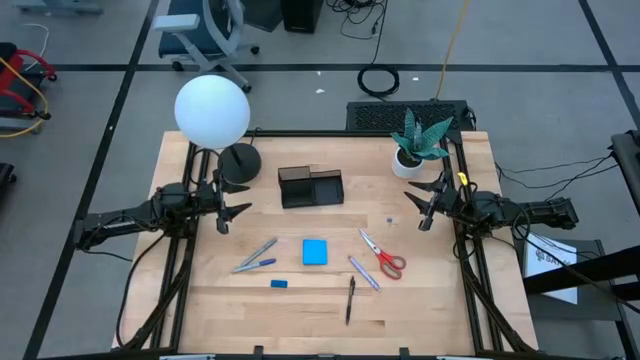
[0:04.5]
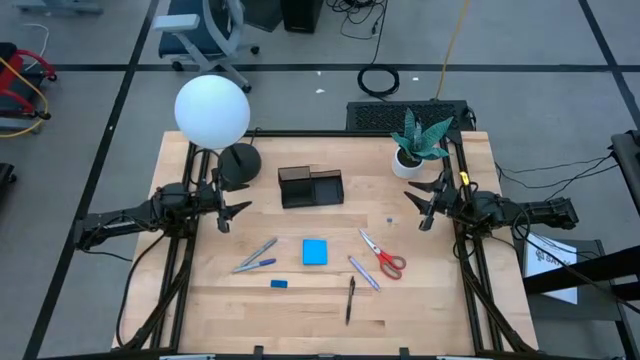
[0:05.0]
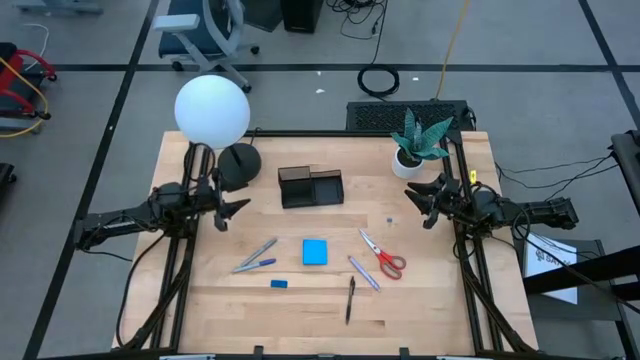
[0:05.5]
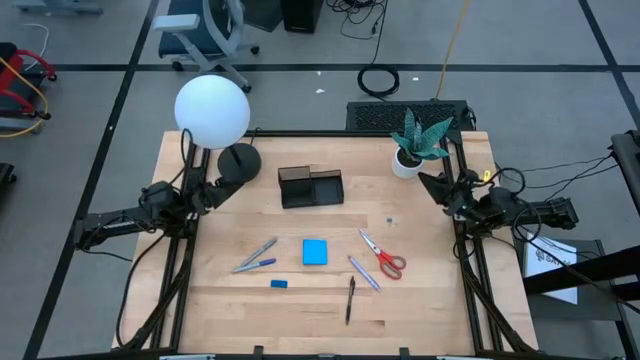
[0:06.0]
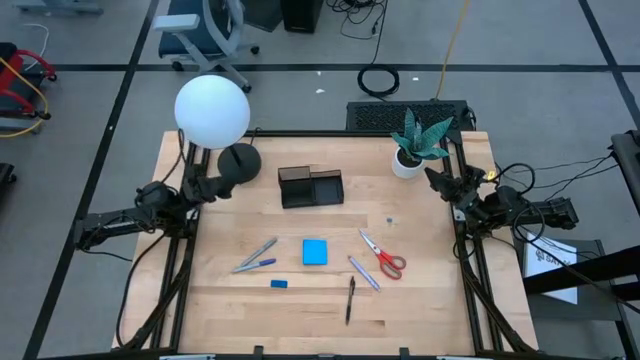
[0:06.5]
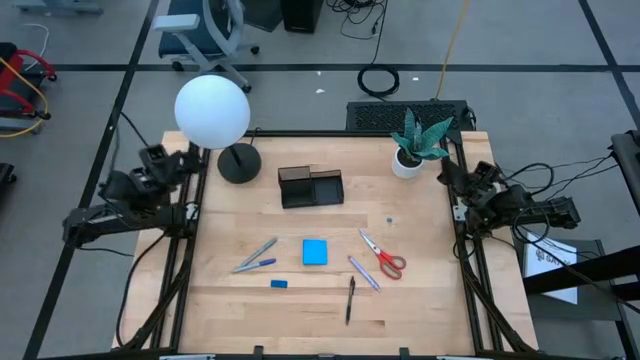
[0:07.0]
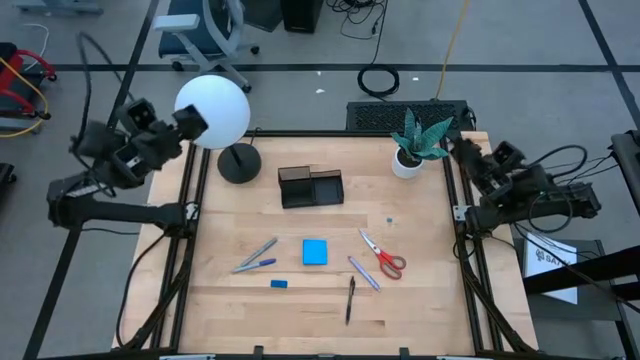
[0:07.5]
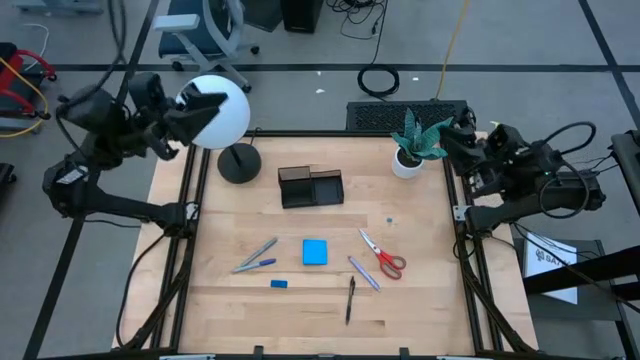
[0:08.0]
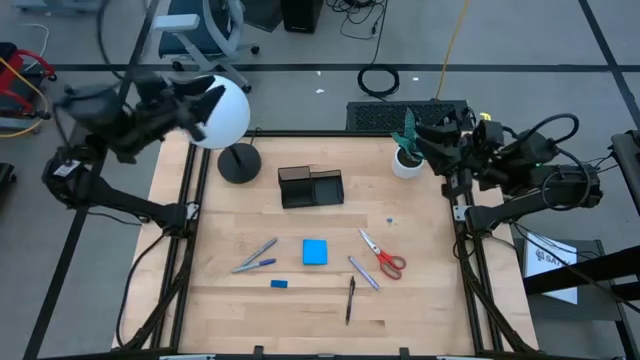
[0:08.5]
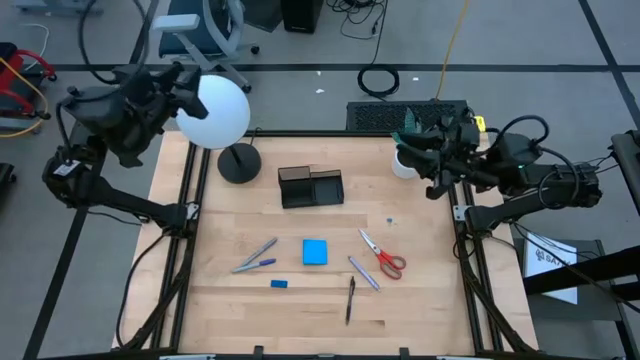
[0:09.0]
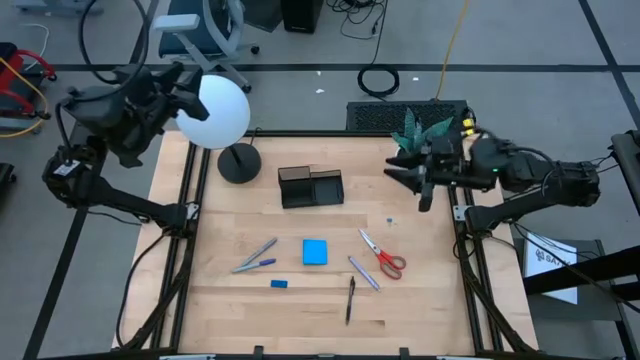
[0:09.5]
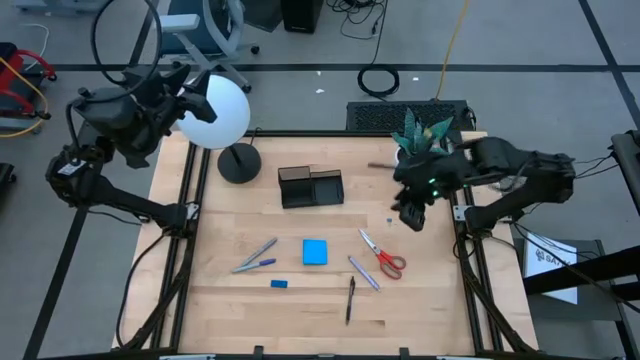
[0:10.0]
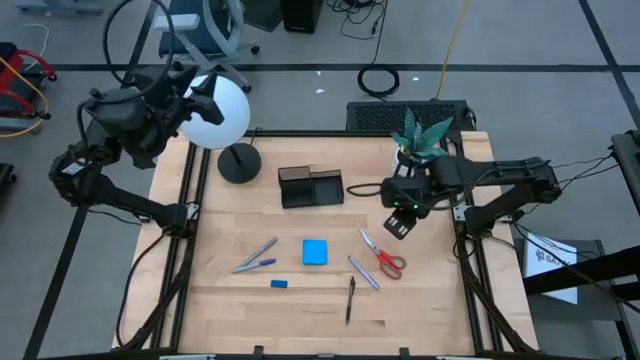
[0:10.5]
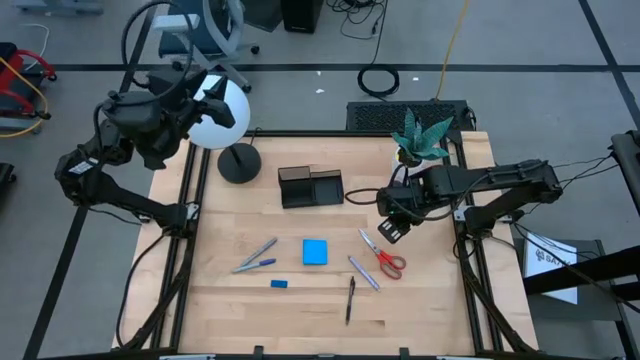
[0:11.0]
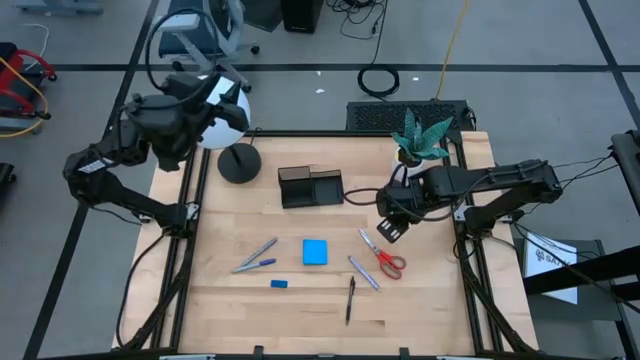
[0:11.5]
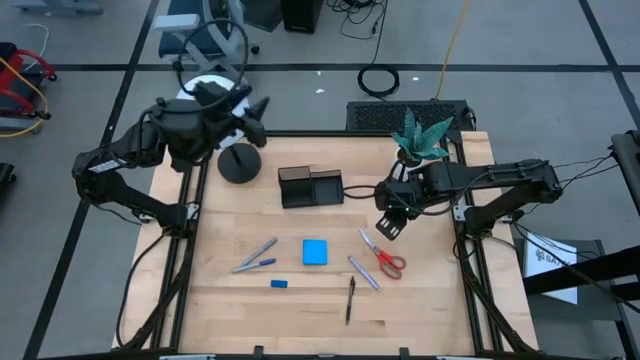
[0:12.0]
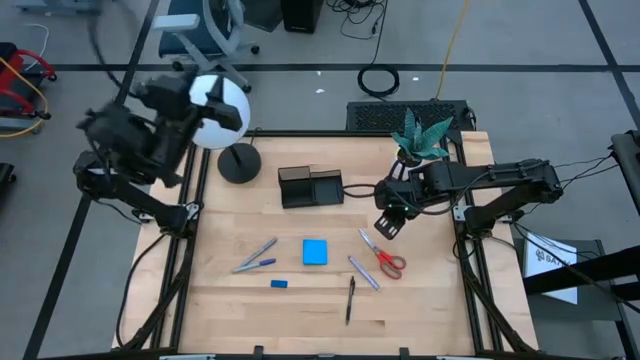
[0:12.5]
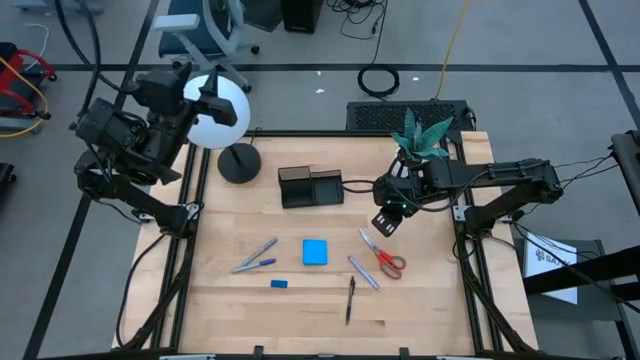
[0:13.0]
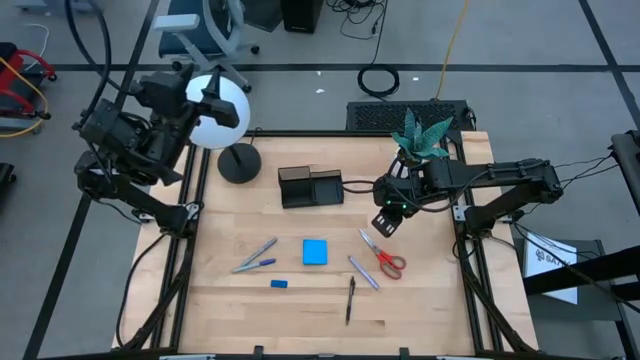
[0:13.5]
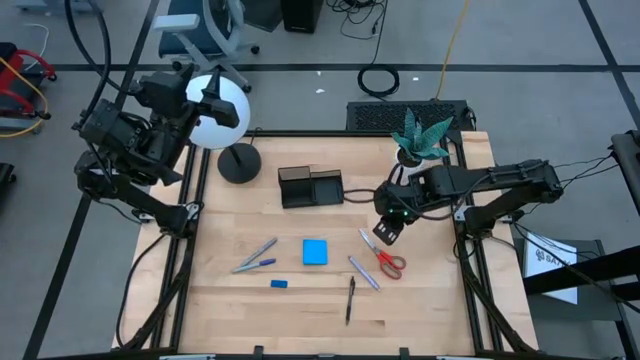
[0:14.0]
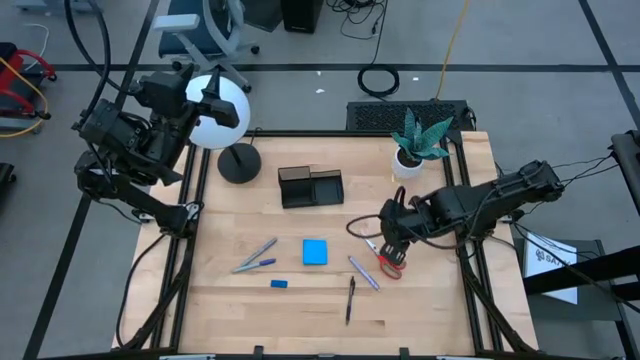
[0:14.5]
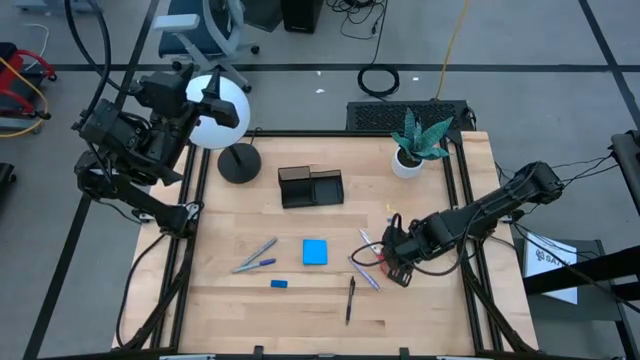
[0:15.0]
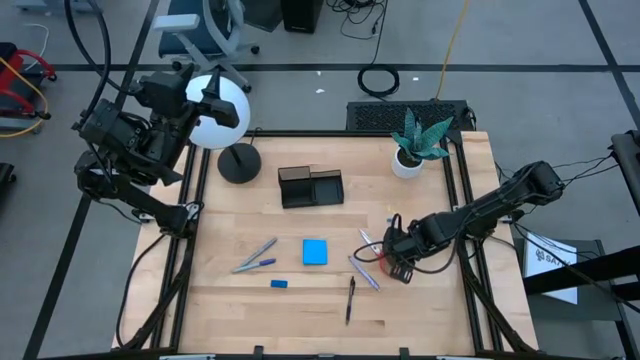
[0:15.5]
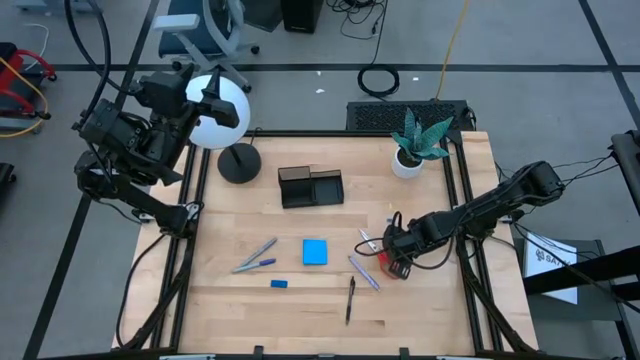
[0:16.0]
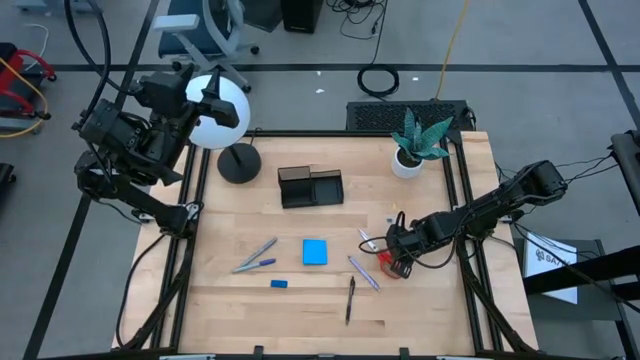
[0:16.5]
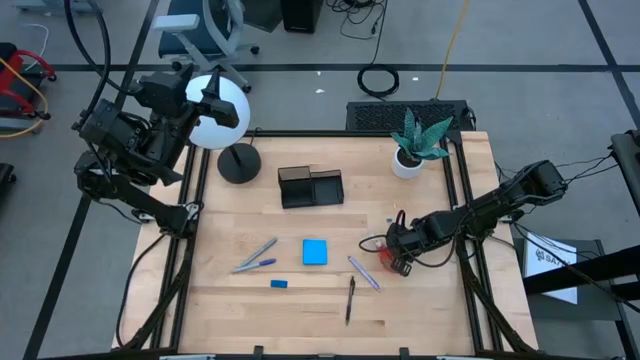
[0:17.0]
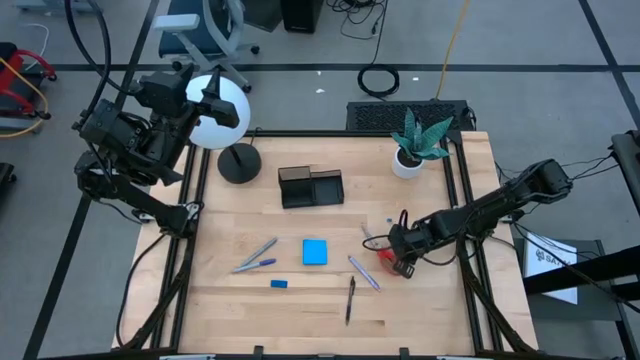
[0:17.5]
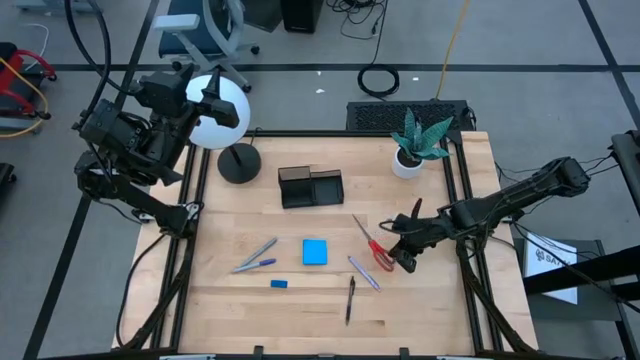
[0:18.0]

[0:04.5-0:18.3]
Task: Pick and place office supplies into organizer
Put the orange scissors into the desk organizer

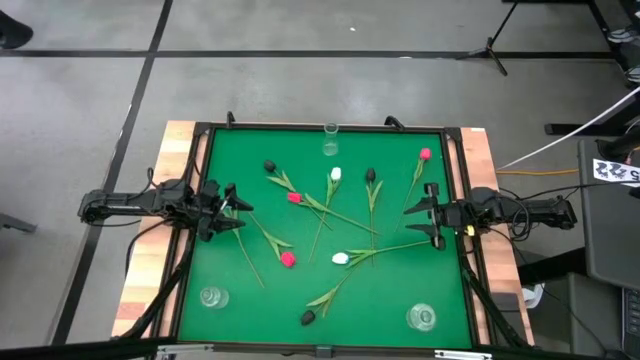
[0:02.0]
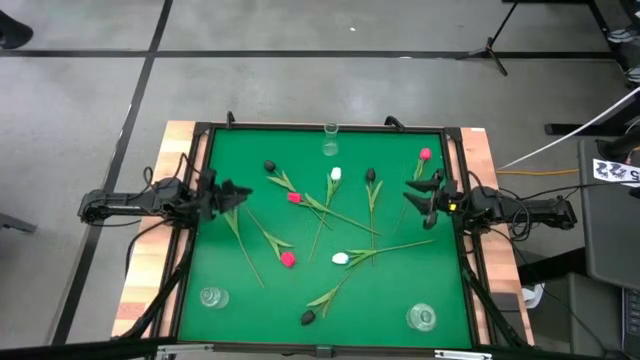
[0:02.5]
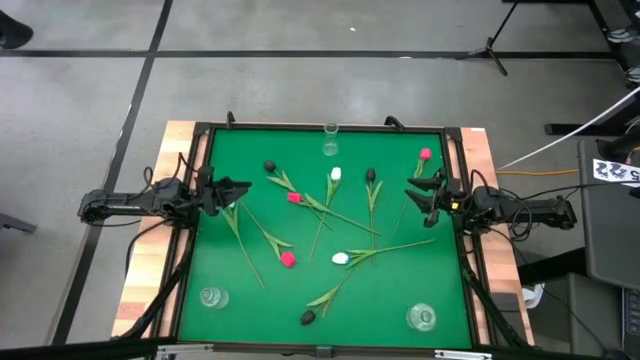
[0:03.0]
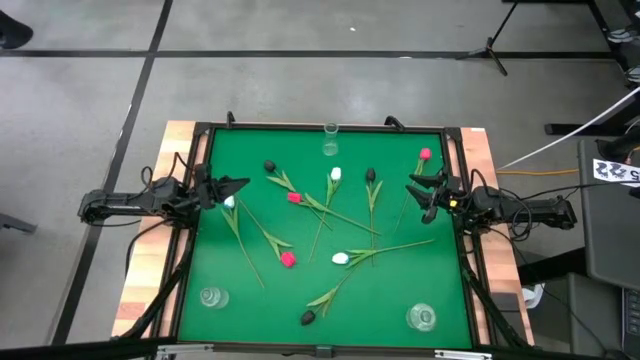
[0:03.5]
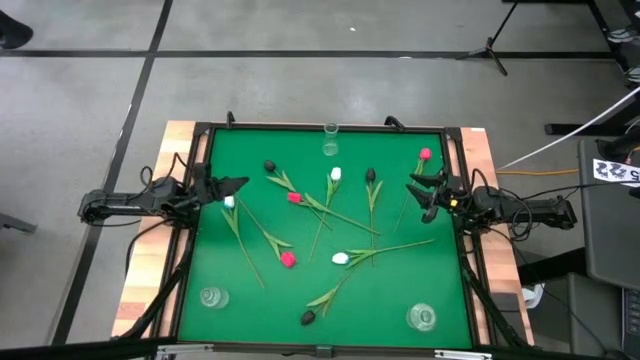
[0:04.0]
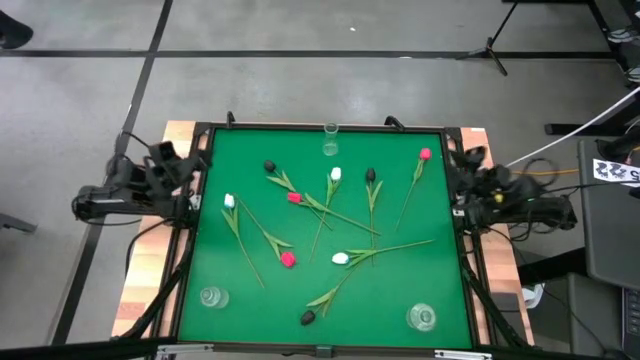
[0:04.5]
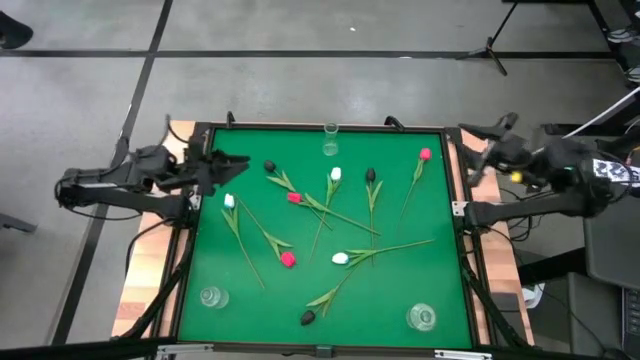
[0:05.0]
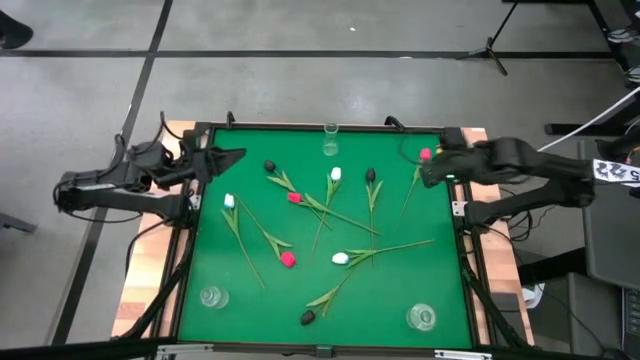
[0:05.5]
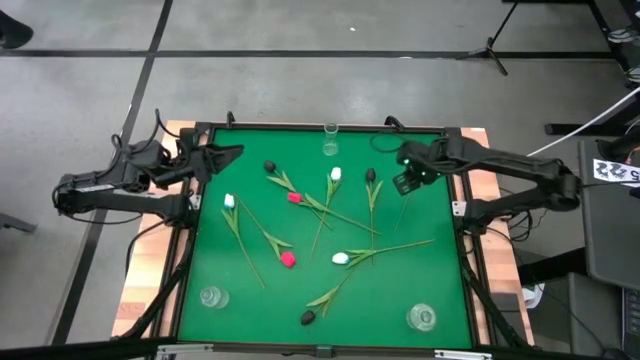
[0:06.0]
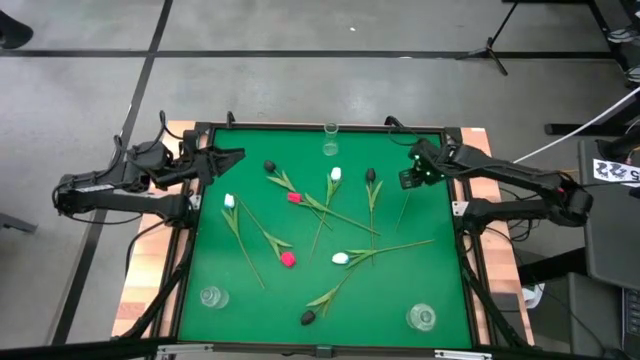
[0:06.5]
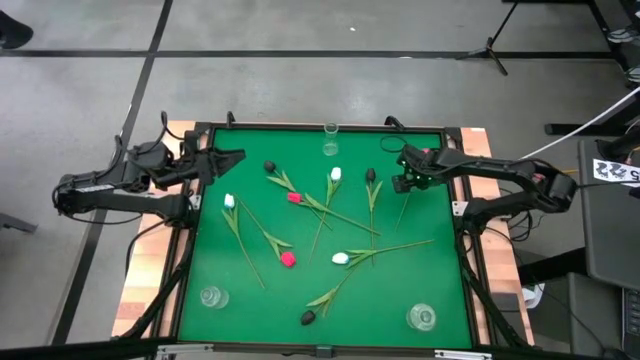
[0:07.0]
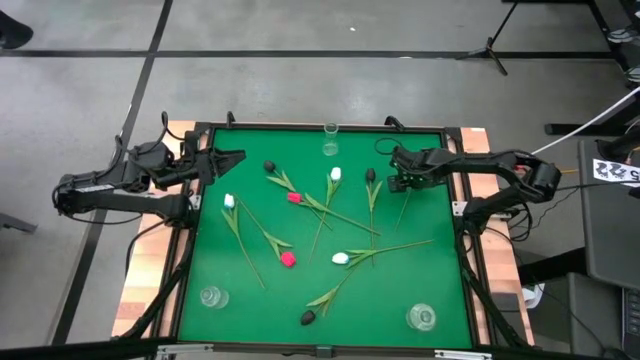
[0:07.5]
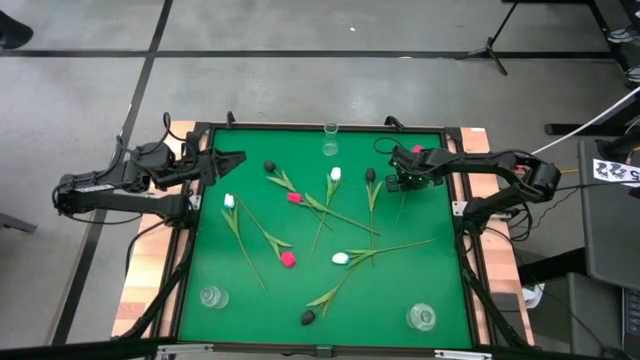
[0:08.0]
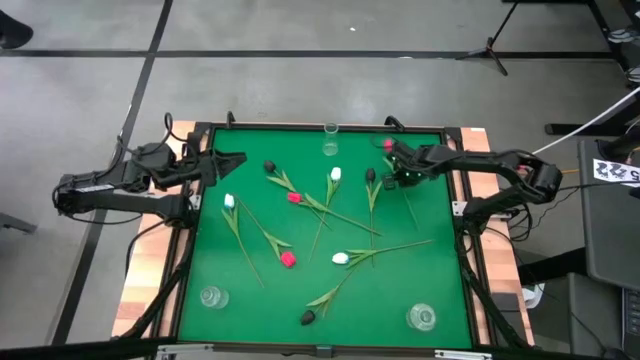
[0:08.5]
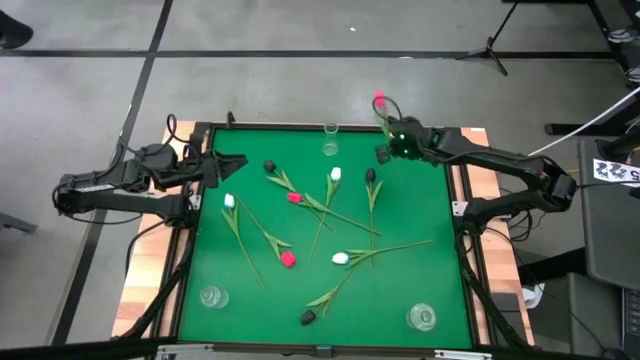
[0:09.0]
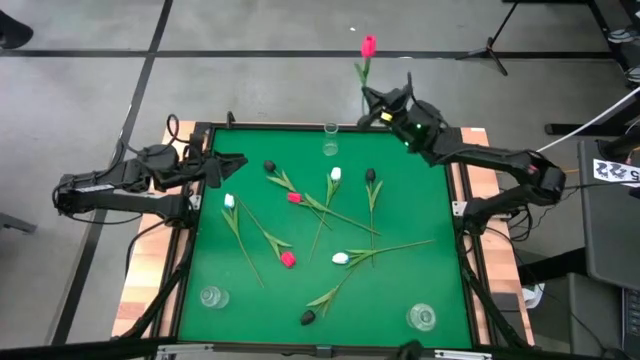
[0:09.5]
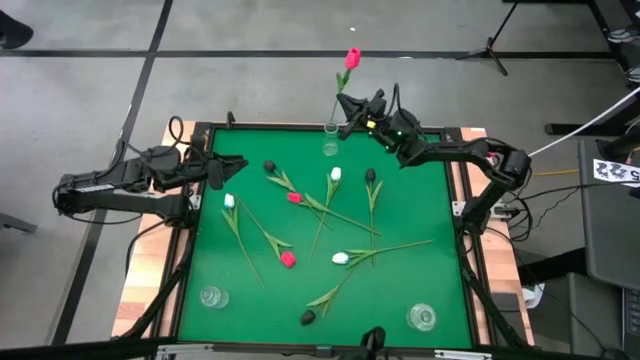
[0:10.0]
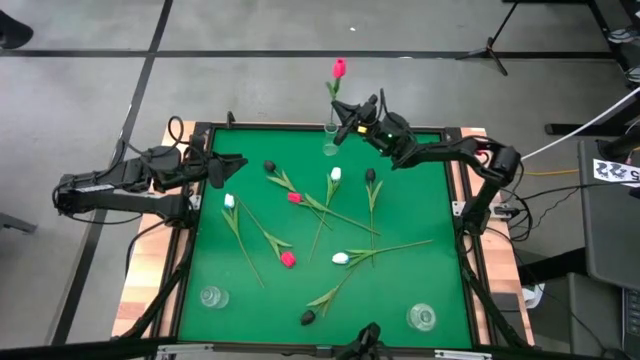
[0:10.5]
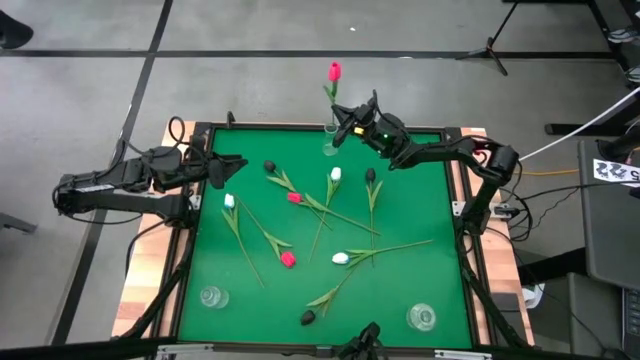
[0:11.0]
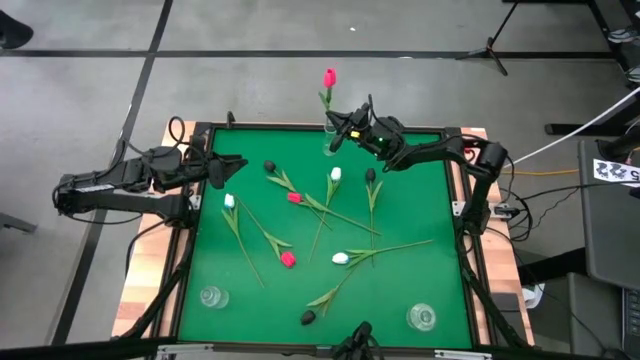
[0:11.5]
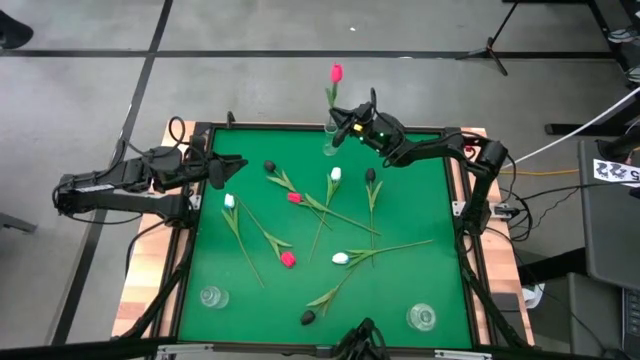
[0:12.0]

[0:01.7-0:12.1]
Task: Sort flowers into vase by color
Put the top right red tulip into the top transparent vase
